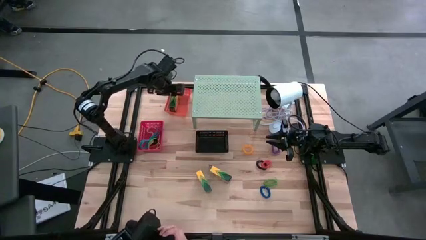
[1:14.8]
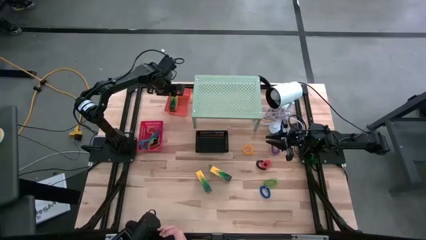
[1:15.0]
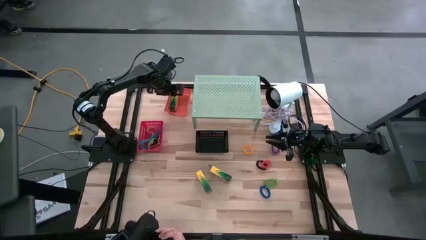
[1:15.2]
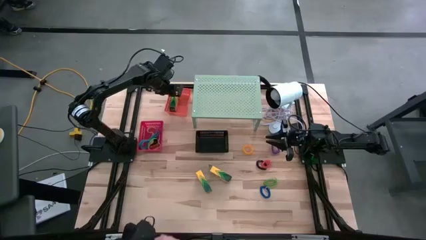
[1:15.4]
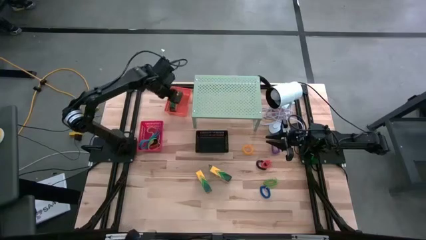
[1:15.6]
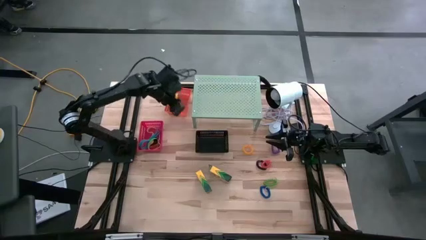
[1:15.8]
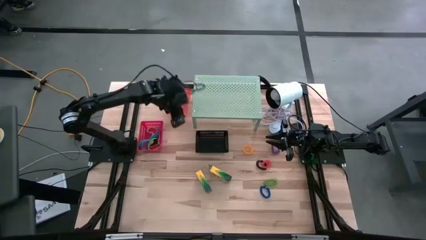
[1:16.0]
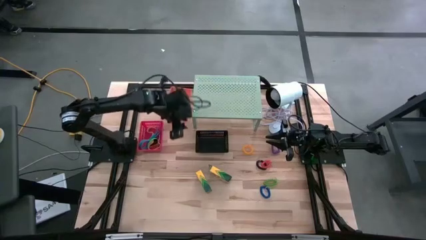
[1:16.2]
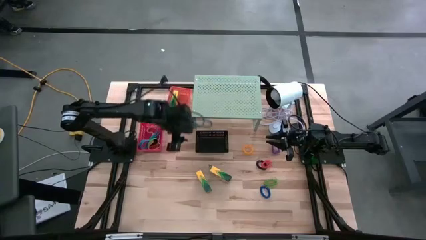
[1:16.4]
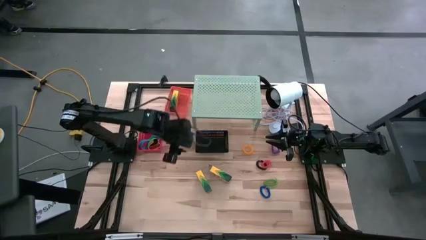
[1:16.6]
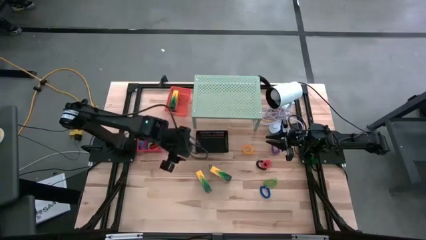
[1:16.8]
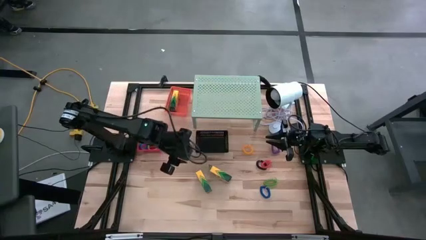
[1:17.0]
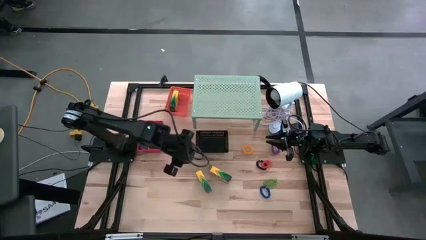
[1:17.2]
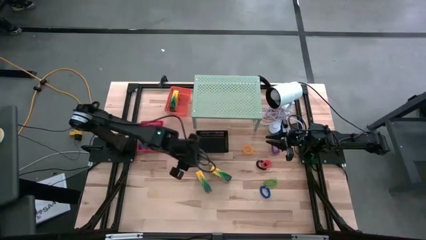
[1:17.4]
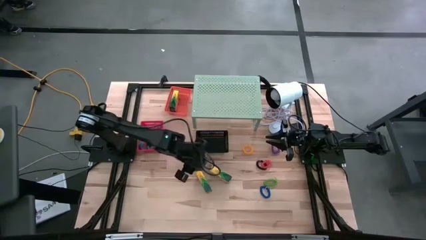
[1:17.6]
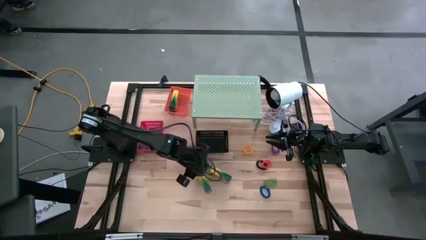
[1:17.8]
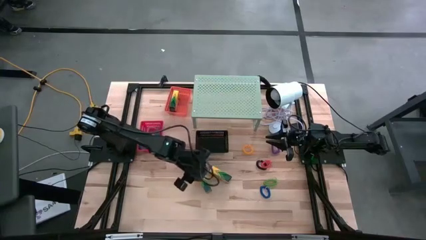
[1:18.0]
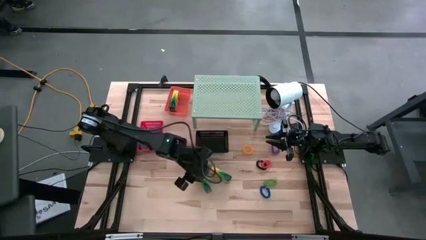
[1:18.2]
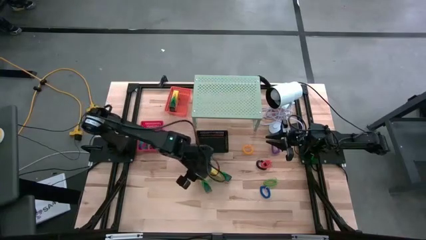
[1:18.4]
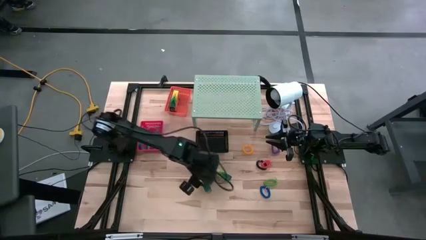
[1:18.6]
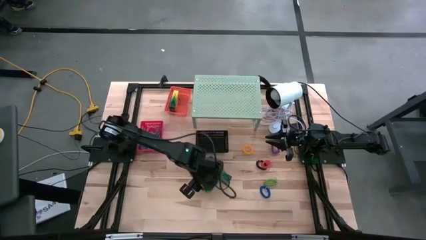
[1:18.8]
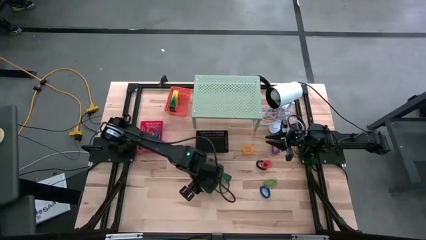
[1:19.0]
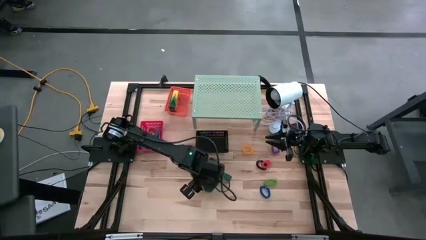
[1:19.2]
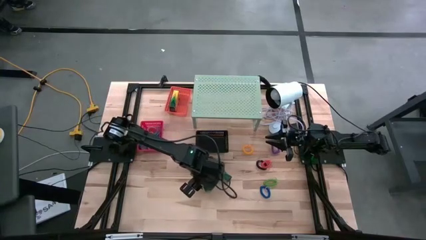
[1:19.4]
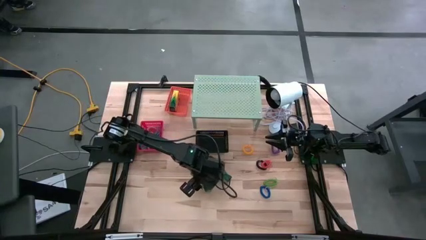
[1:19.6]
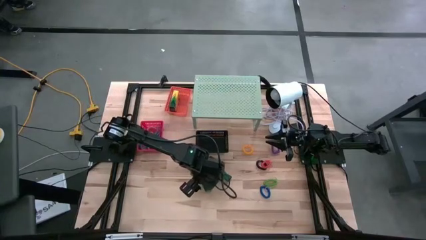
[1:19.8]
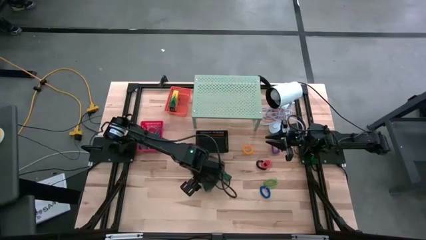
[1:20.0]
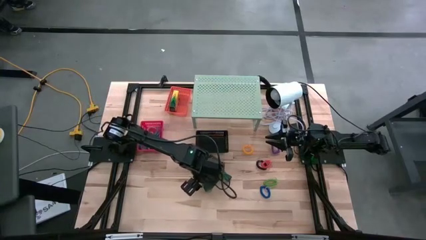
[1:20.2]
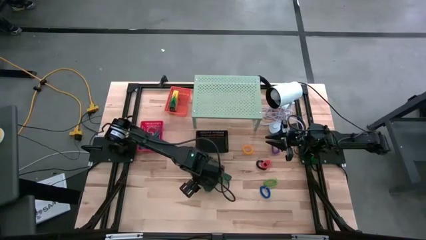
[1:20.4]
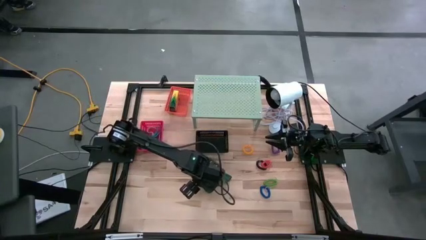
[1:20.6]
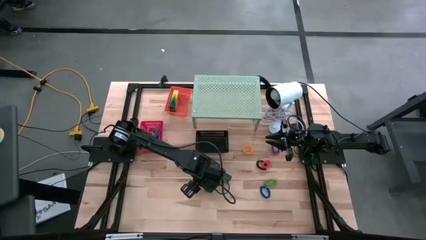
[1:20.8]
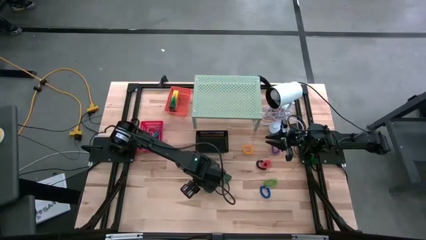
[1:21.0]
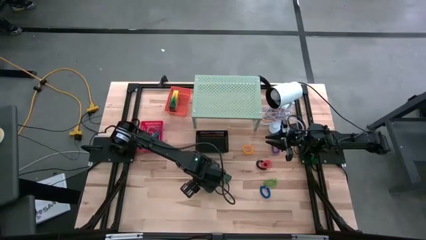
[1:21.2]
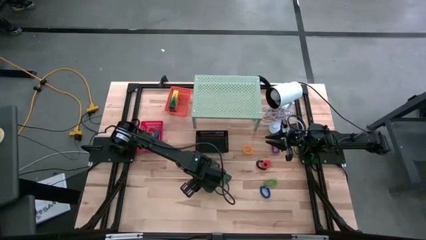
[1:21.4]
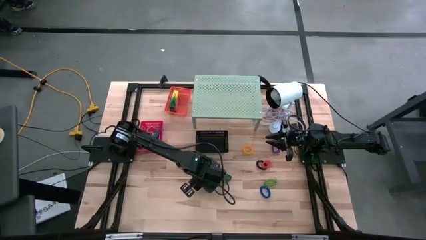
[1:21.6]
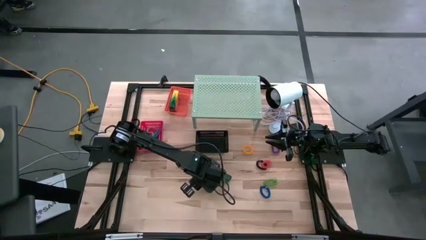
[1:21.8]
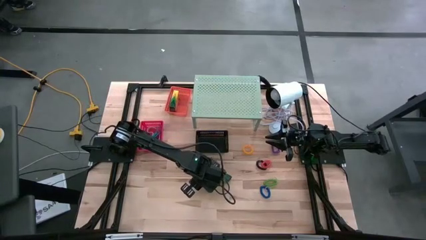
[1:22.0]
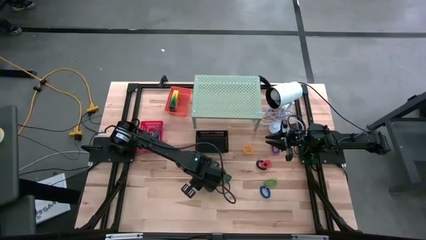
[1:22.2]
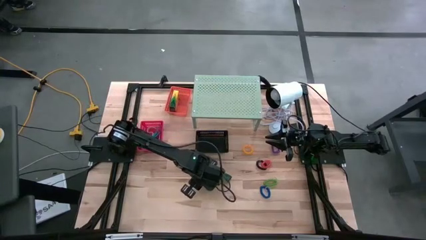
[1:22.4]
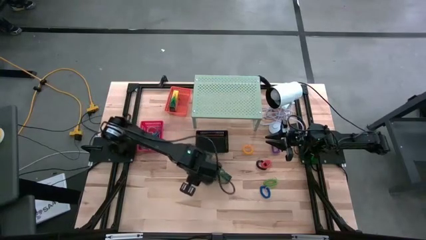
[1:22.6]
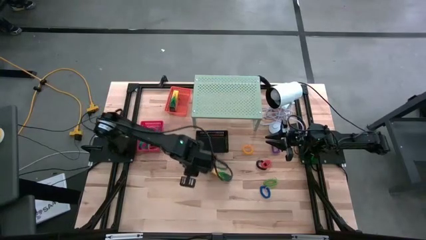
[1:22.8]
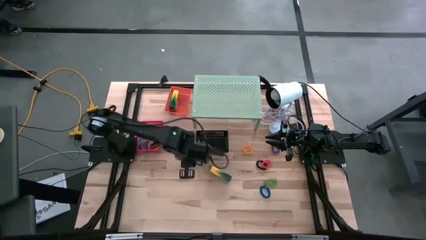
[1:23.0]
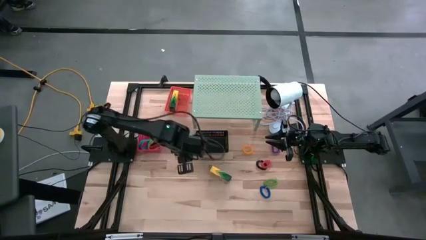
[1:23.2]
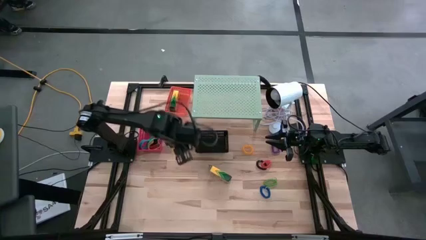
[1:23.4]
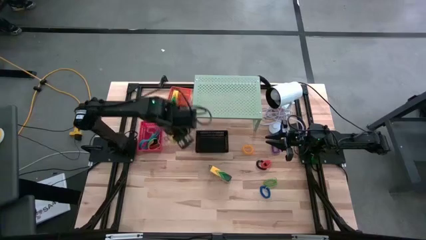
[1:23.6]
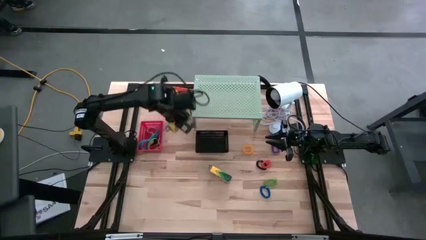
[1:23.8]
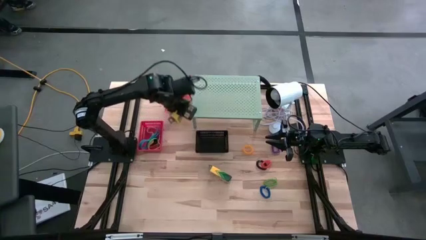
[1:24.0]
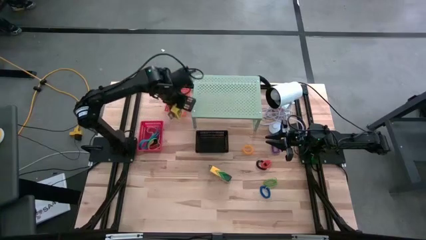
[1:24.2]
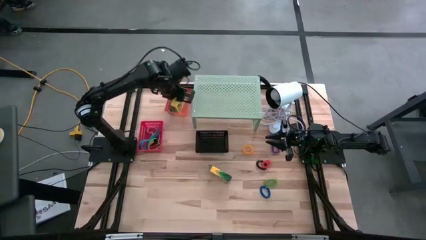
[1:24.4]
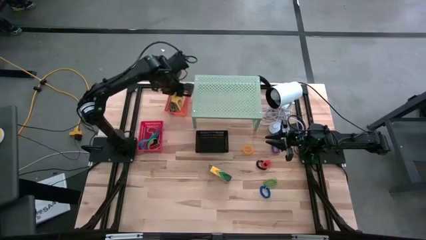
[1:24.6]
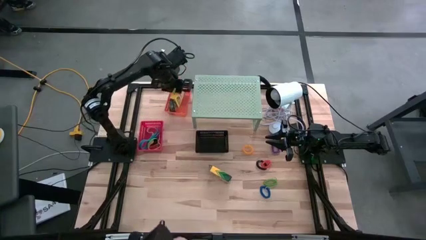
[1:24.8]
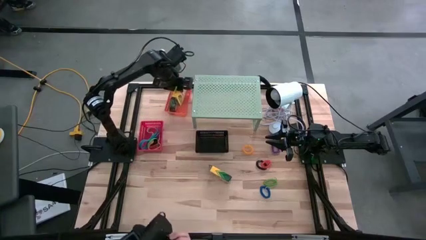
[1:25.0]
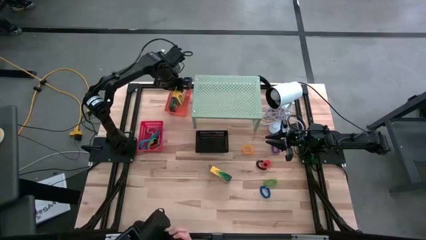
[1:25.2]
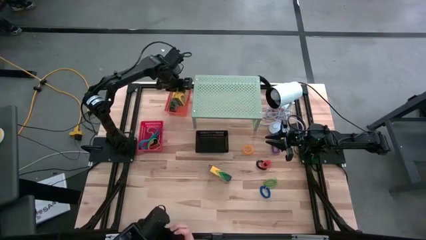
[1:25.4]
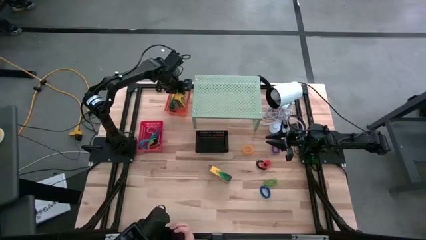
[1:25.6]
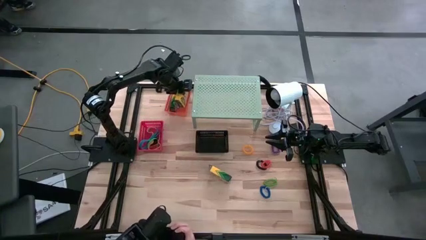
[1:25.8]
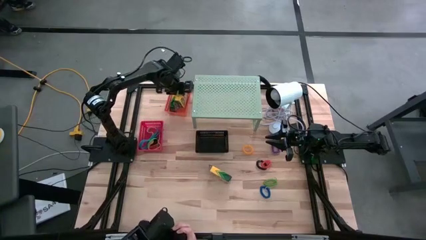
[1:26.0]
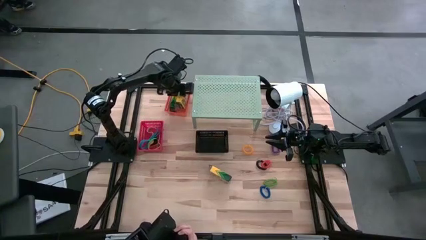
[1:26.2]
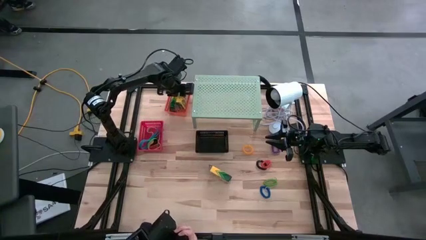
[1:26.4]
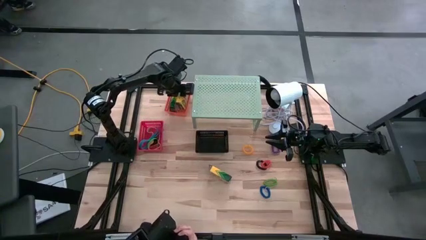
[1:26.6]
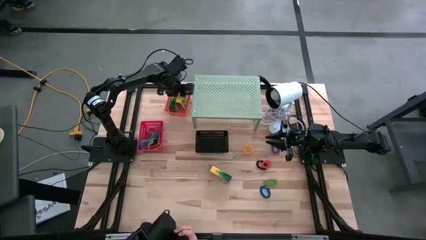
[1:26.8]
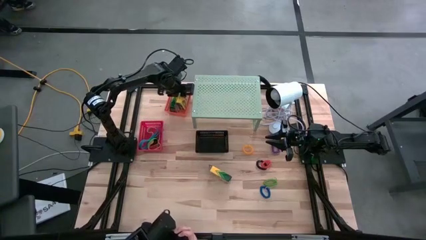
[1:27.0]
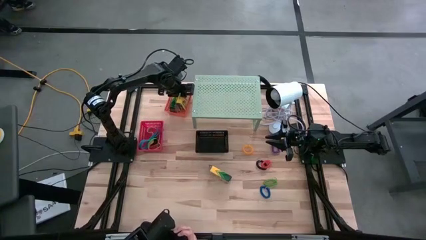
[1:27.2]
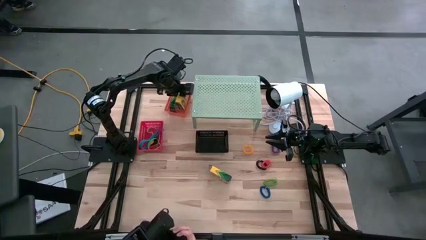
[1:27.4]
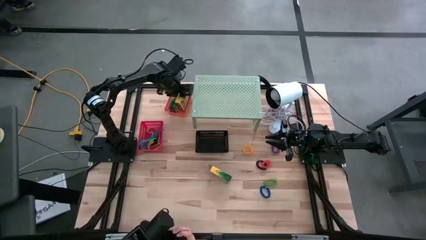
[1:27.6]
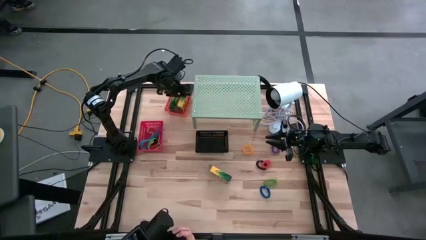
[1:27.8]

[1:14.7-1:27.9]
Task: Pick & Place Office Desk Supplies
Put the left crayon box into the orange bin on the shelf

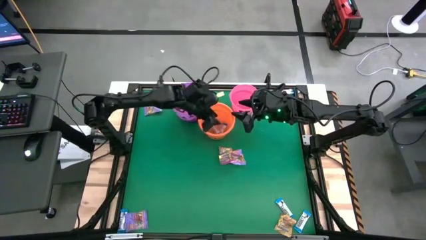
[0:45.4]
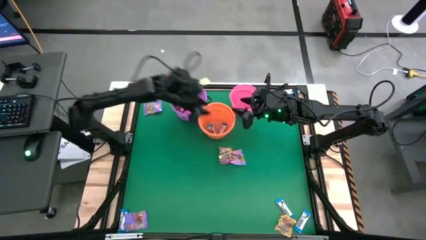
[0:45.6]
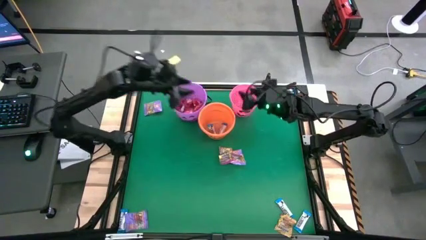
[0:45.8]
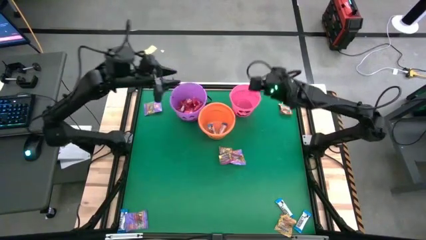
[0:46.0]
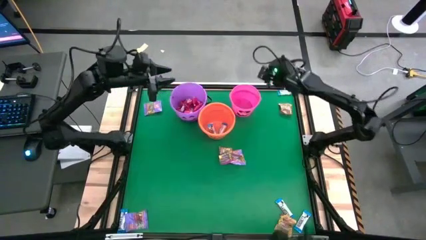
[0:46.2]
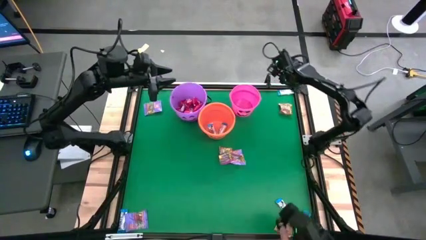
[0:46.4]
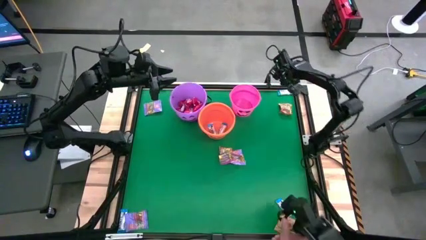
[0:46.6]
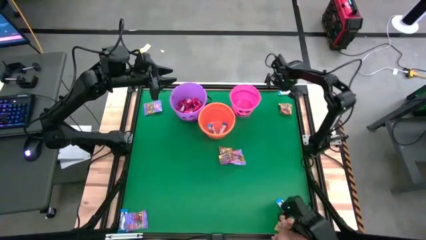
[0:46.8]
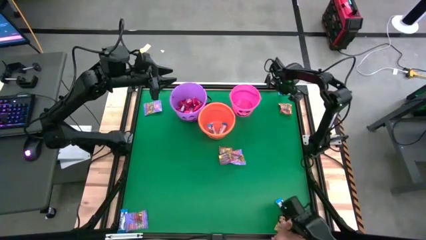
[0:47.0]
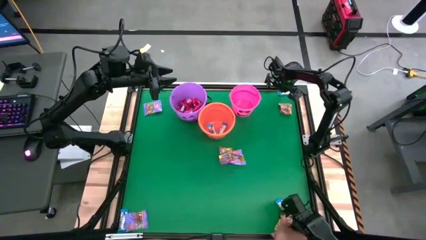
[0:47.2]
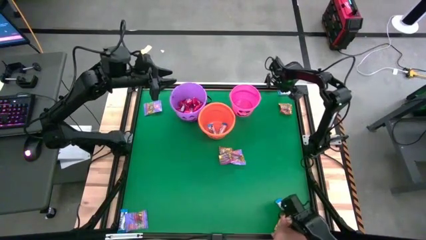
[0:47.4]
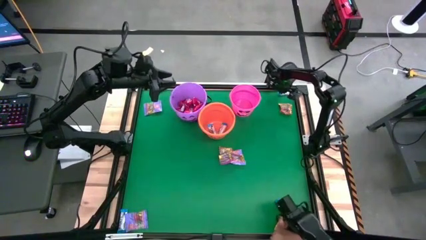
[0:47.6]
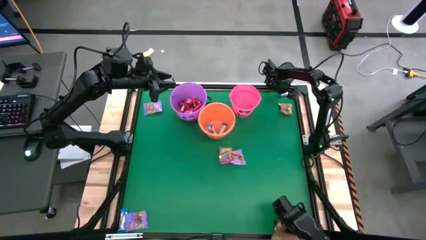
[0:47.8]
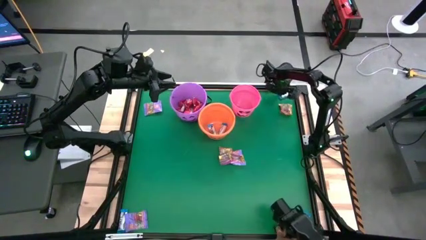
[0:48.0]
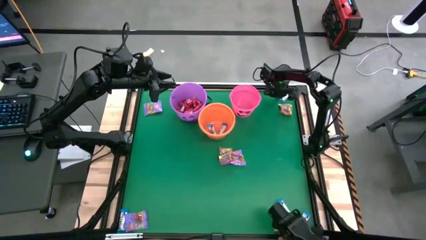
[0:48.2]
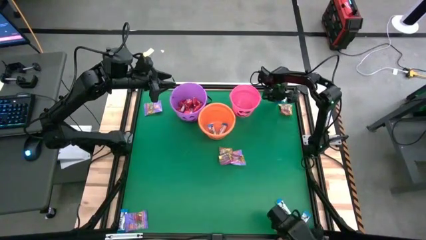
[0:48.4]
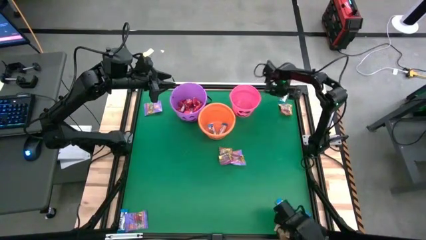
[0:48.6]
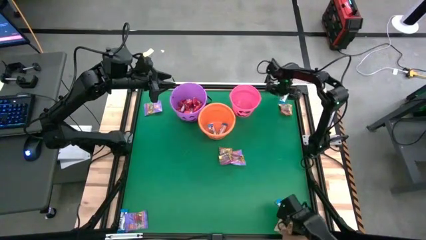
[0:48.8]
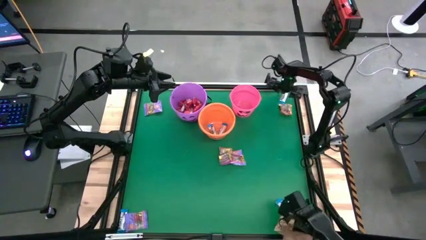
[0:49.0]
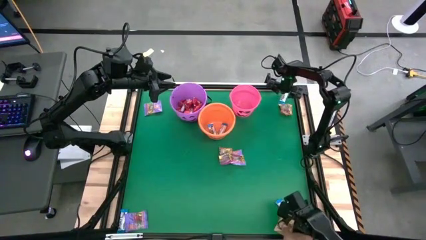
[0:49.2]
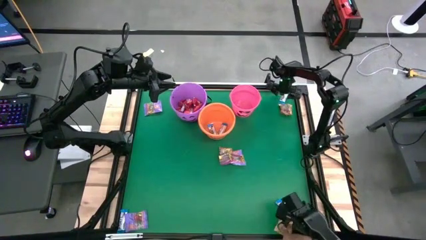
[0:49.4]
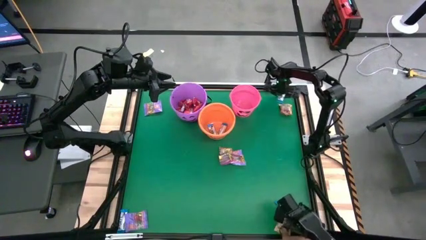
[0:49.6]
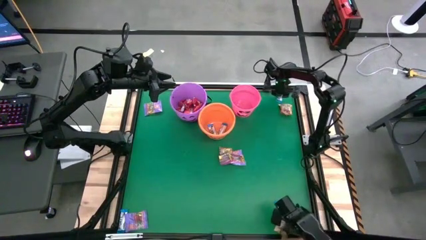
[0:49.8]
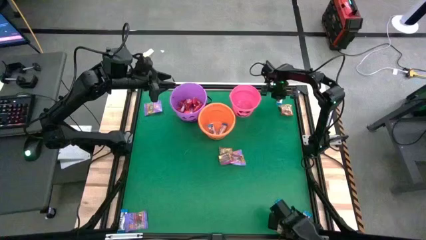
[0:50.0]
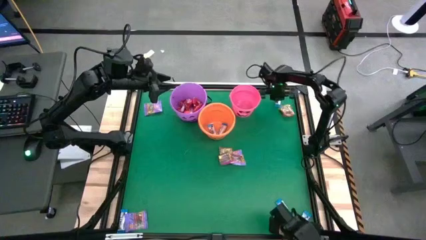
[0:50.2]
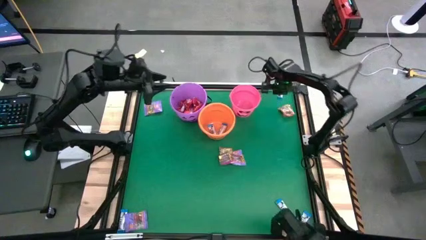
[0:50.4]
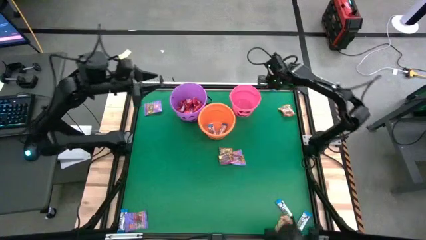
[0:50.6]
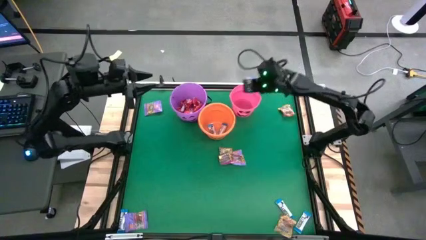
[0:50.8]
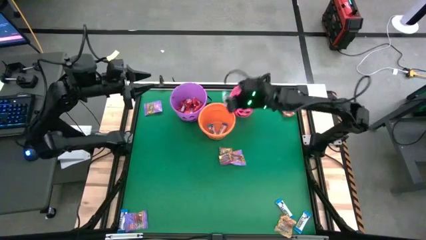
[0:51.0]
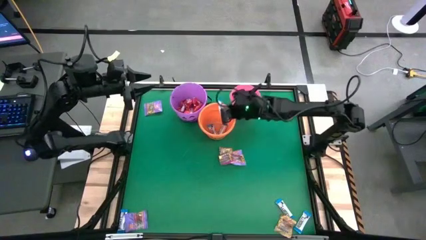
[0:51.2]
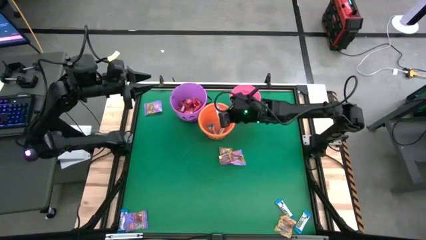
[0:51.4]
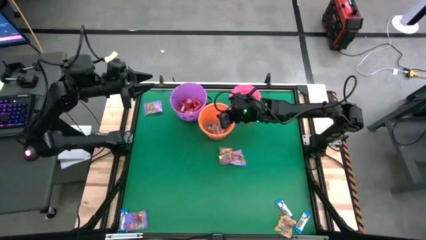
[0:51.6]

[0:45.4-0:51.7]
Task: Sort candy by brand, put in halloween buckets
Put the white chocolate into the orange bucket
